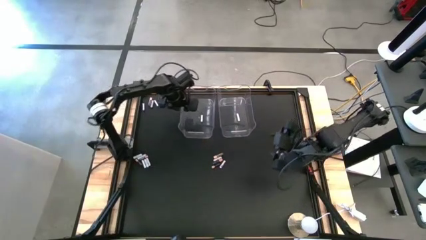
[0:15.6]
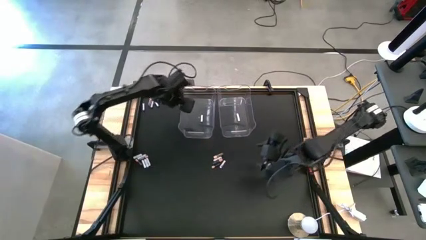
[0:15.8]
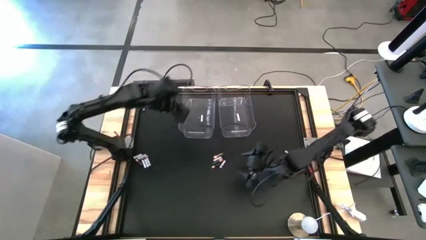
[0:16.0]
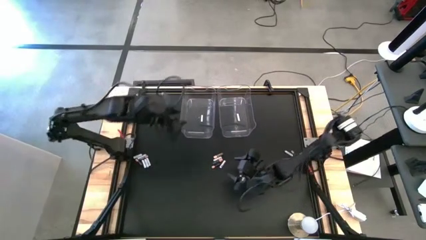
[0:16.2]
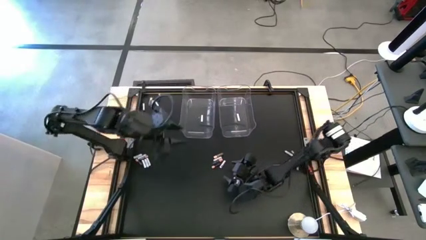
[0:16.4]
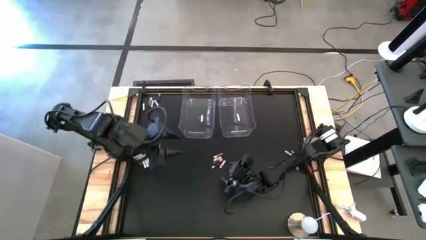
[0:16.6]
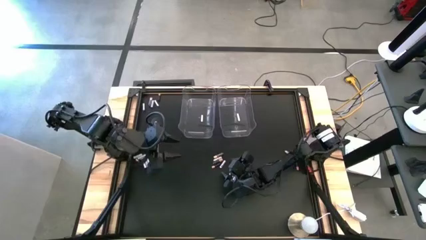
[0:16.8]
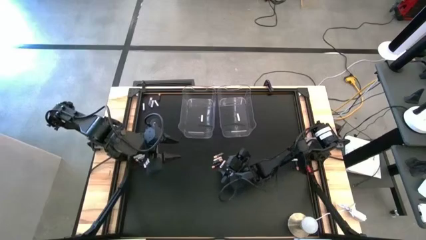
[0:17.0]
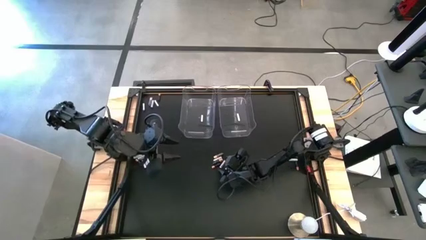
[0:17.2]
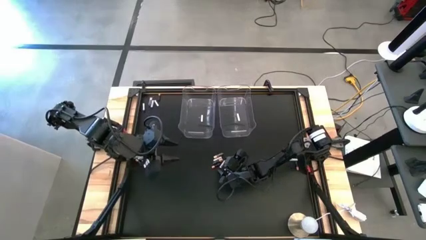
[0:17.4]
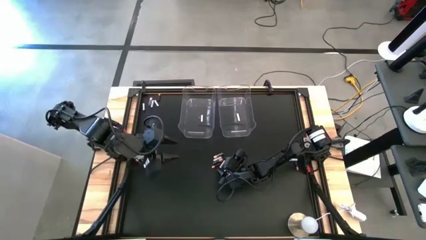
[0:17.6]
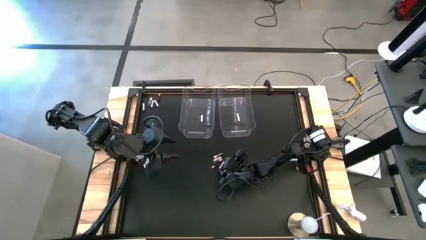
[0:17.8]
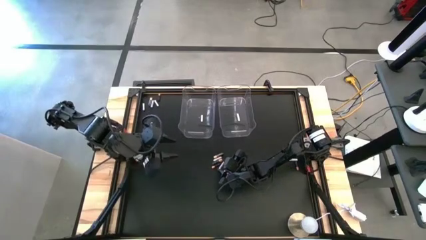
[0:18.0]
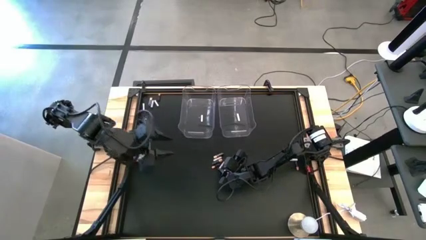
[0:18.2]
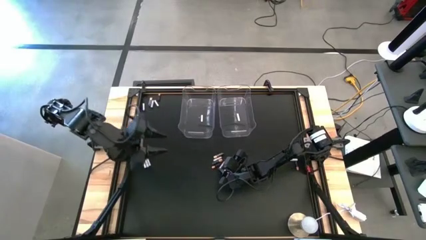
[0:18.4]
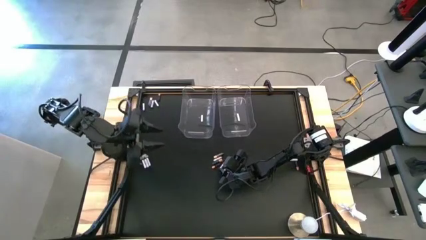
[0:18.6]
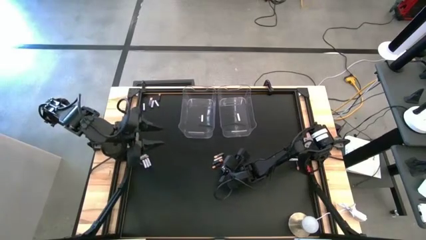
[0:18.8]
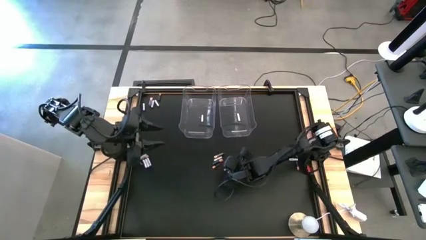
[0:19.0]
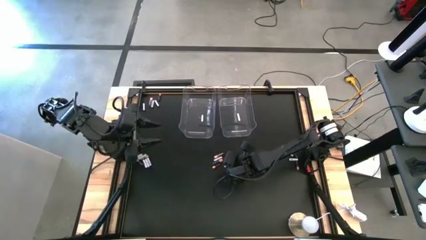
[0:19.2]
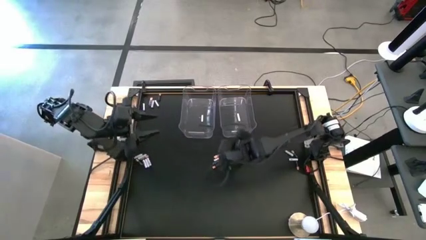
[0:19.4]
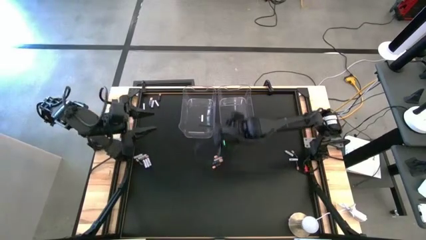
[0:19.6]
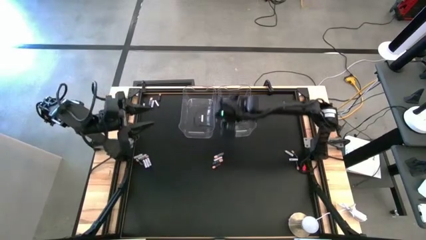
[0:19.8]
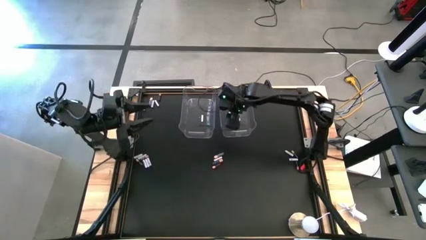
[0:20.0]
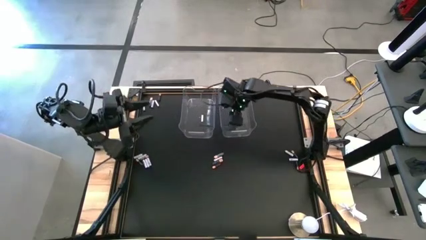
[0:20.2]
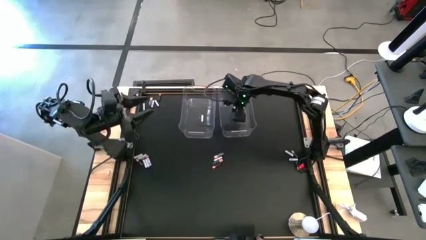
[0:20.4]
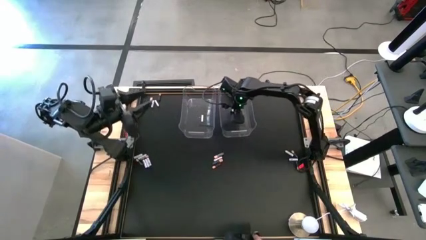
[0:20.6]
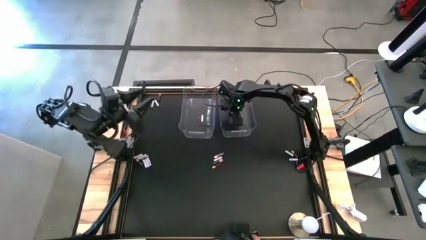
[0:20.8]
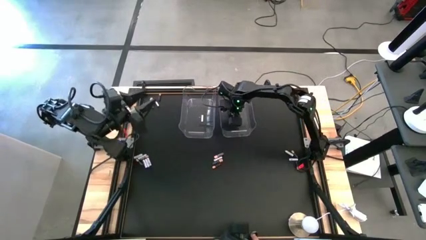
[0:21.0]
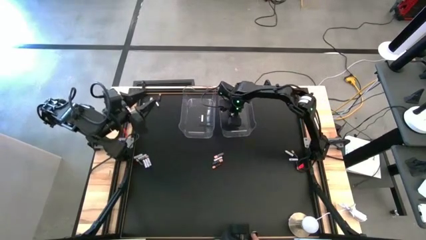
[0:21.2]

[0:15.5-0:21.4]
Task: Sort batteries
Put the white battery into the right transparent bin

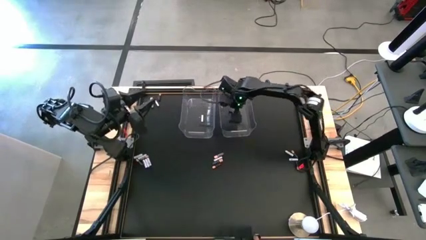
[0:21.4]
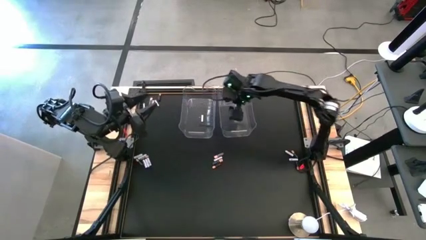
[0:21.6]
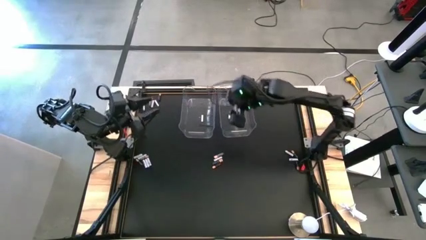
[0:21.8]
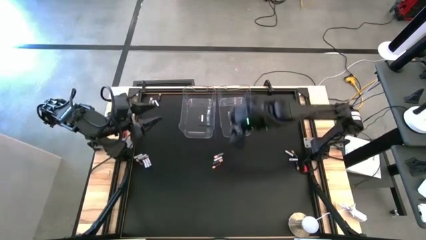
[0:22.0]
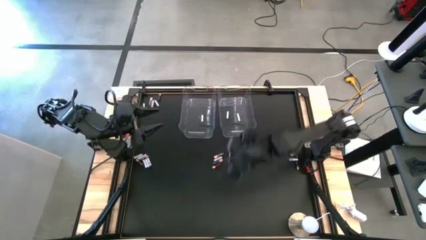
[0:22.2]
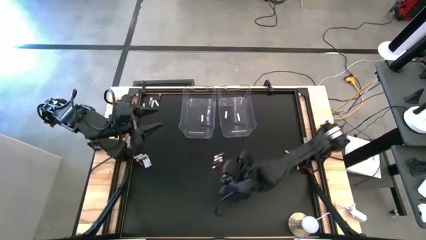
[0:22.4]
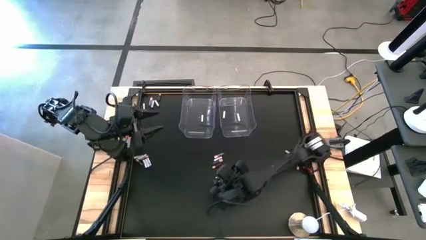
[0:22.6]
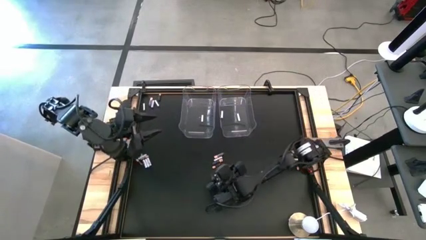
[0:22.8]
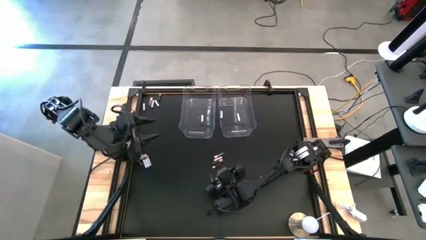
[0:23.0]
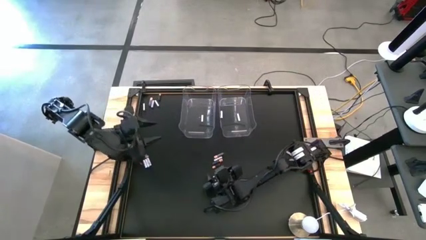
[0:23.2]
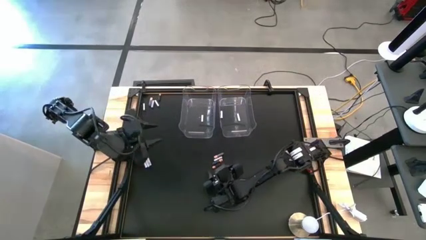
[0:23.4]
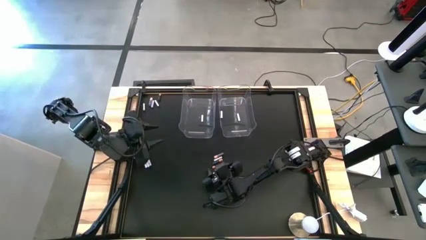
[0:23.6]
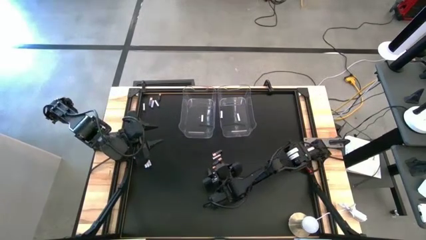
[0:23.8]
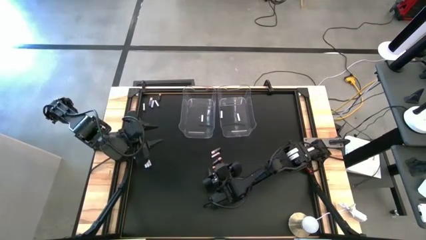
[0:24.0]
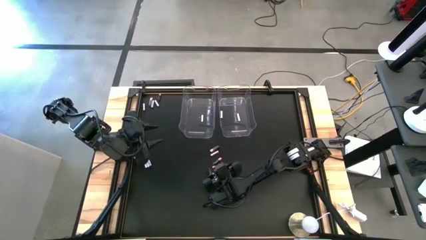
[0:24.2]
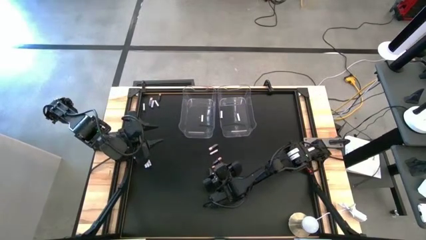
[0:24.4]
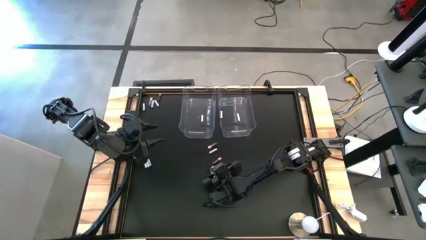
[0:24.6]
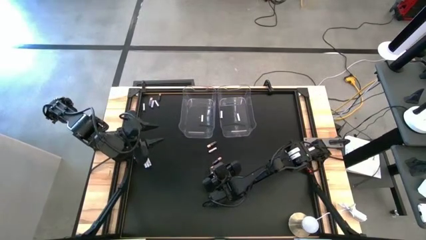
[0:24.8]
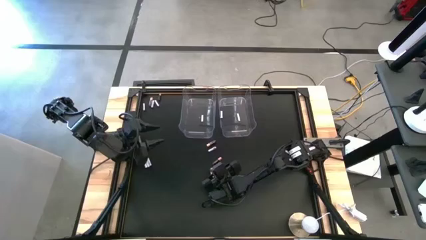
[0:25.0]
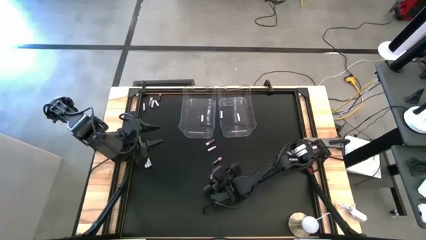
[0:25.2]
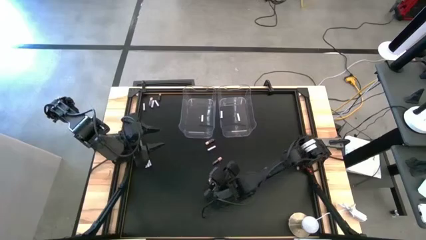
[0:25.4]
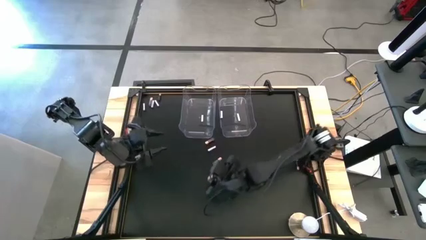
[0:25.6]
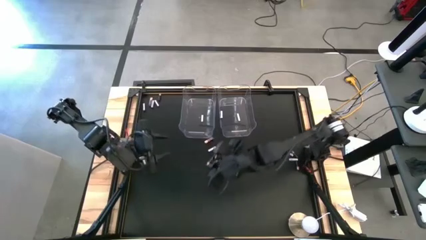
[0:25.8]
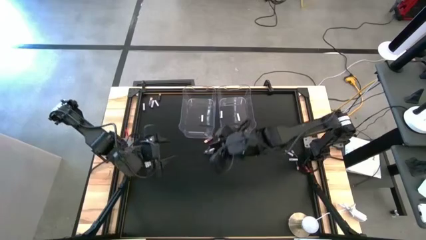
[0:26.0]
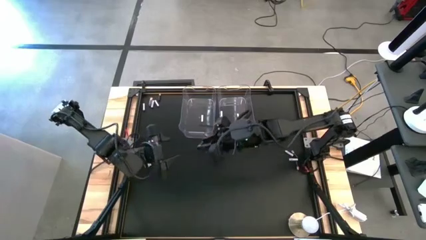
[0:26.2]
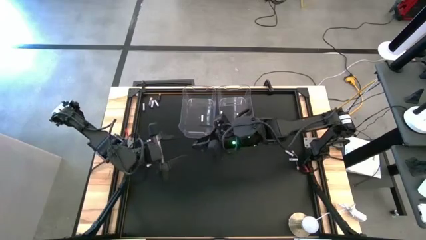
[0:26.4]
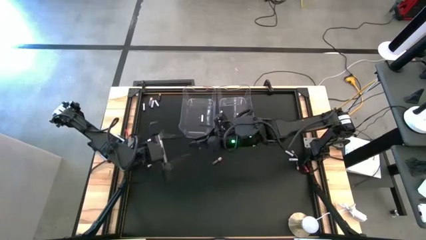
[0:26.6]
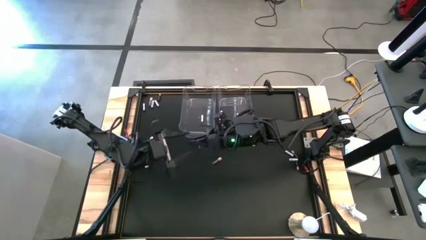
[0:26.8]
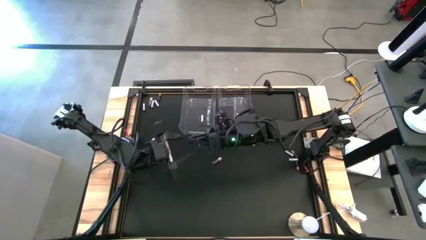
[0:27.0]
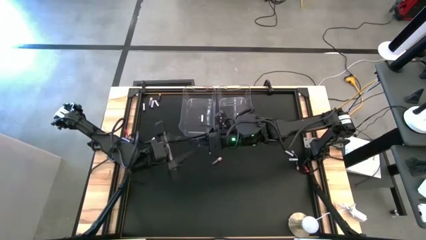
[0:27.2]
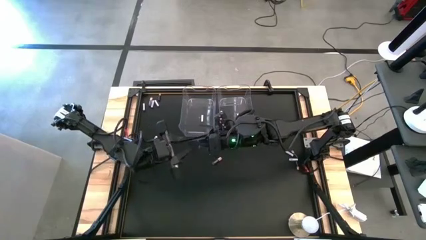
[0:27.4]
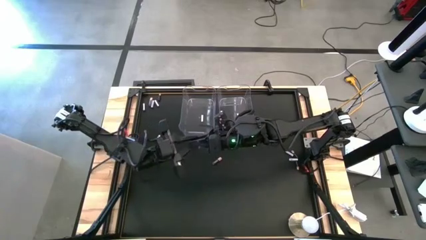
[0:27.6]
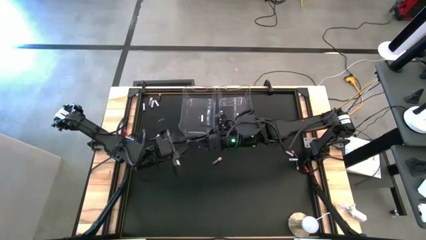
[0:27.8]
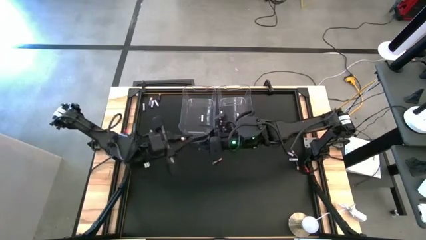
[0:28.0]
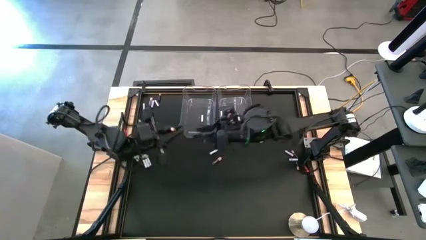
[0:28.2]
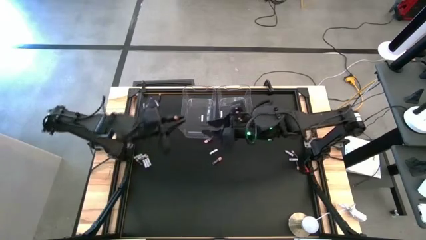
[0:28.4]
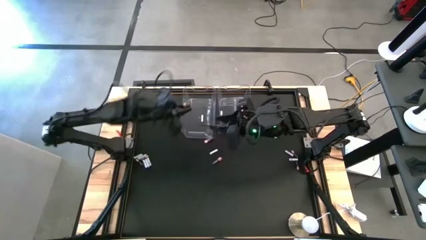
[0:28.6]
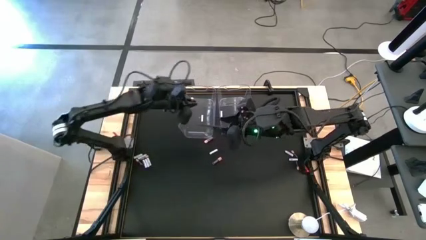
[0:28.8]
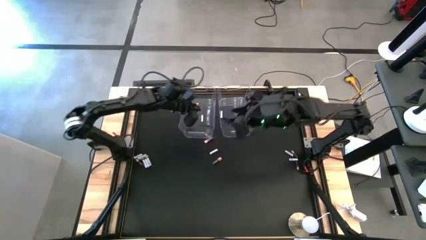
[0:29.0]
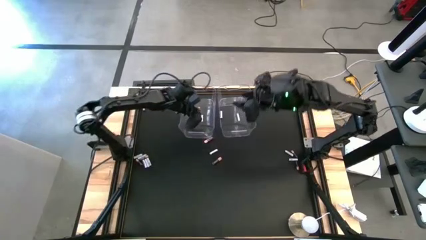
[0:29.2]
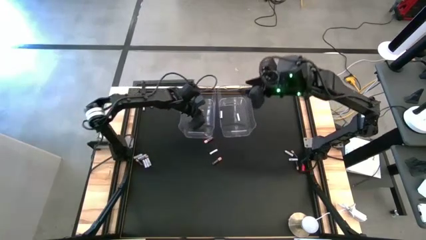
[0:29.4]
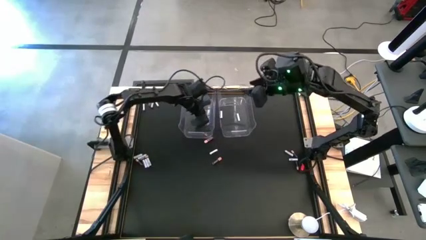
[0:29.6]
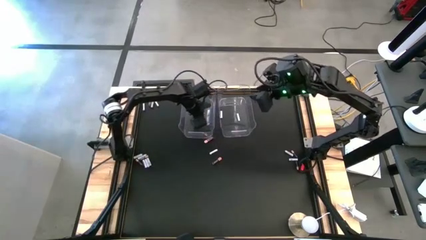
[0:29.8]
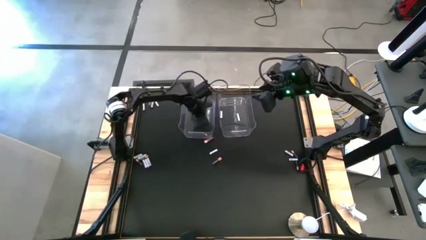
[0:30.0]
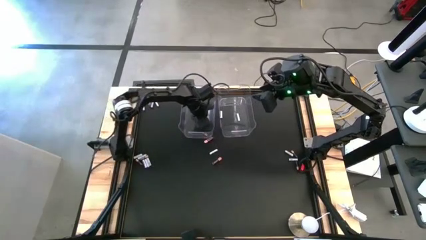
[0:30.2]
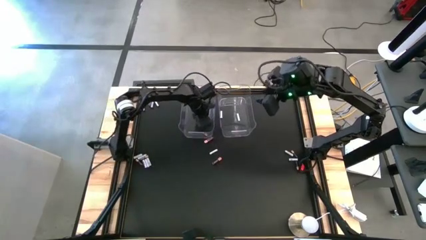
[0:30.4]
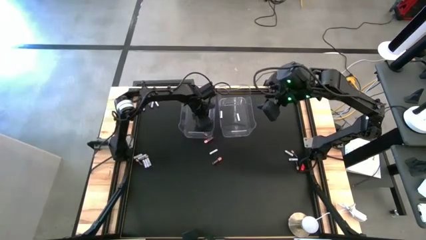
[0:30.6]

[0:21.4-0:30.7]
Put the black battery into the left transparent bin
